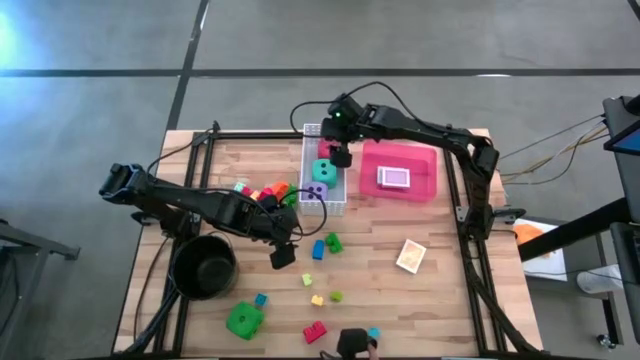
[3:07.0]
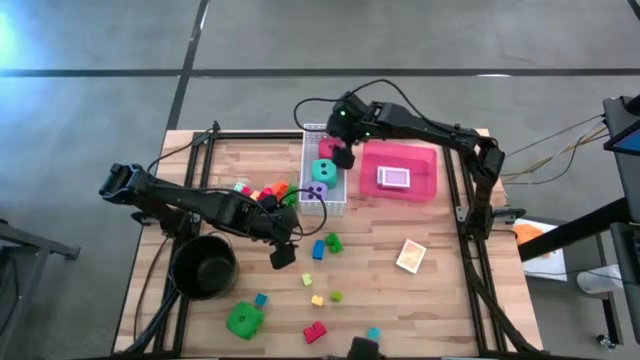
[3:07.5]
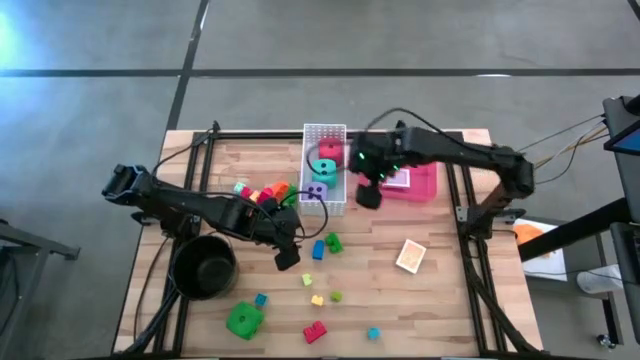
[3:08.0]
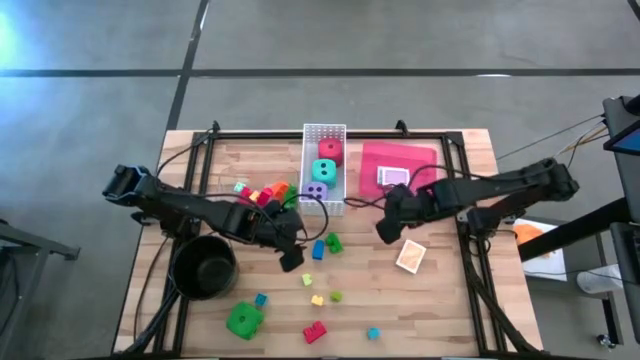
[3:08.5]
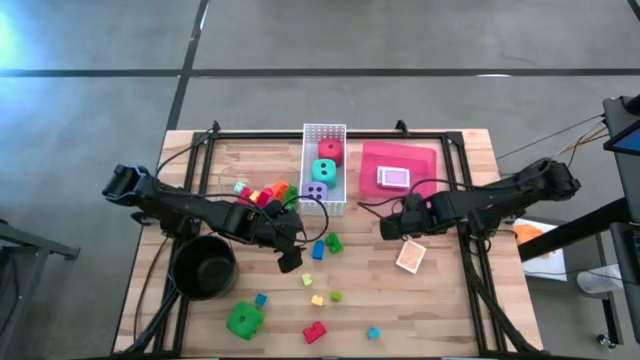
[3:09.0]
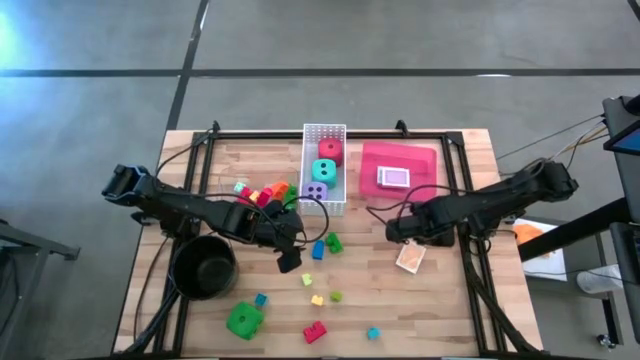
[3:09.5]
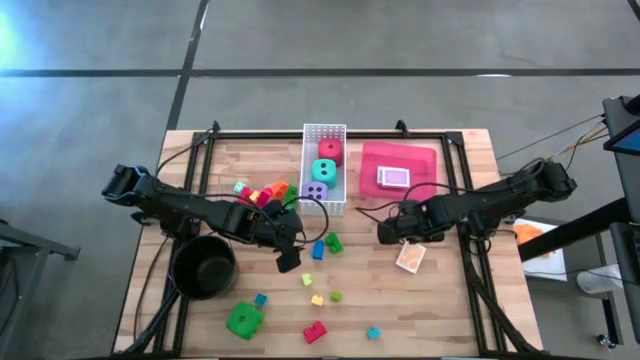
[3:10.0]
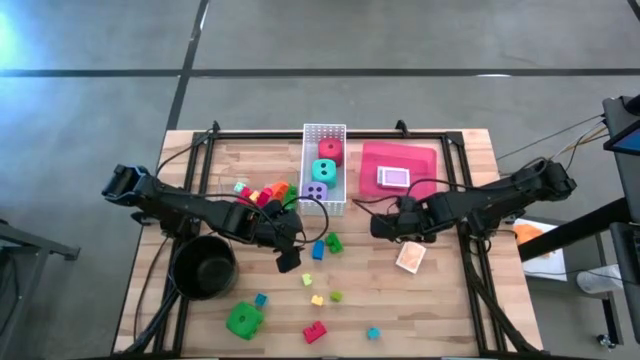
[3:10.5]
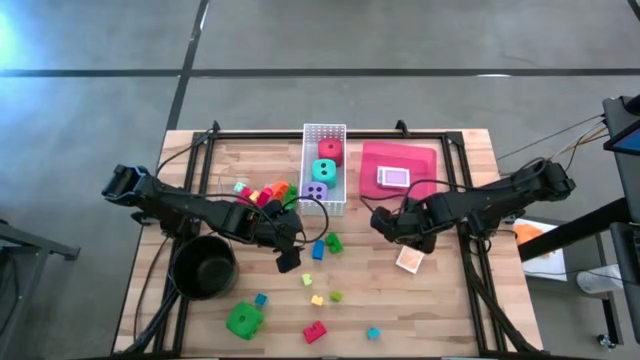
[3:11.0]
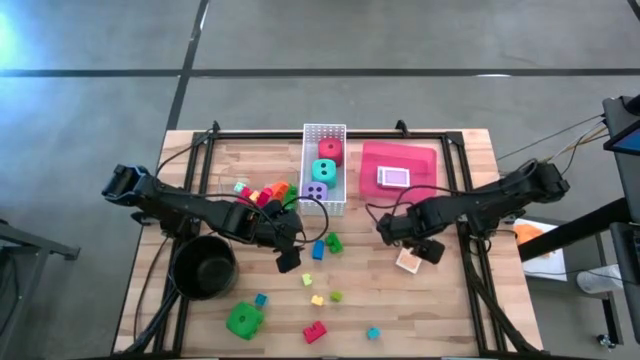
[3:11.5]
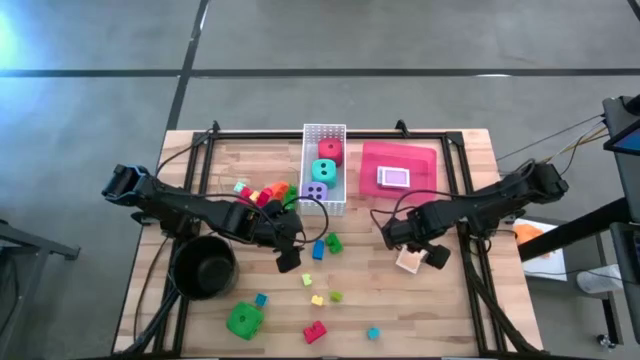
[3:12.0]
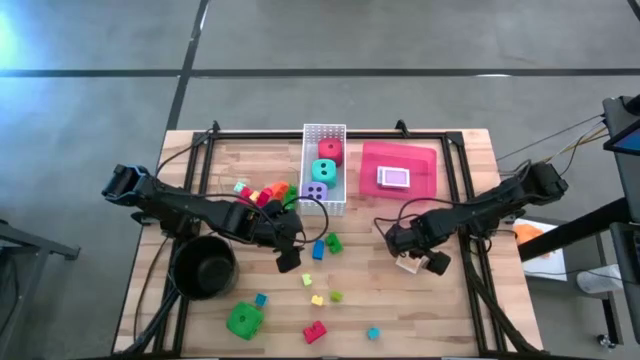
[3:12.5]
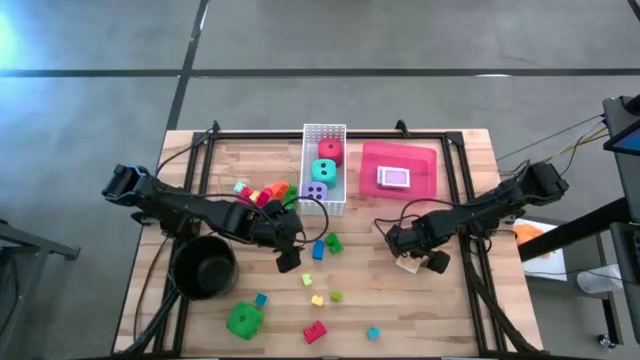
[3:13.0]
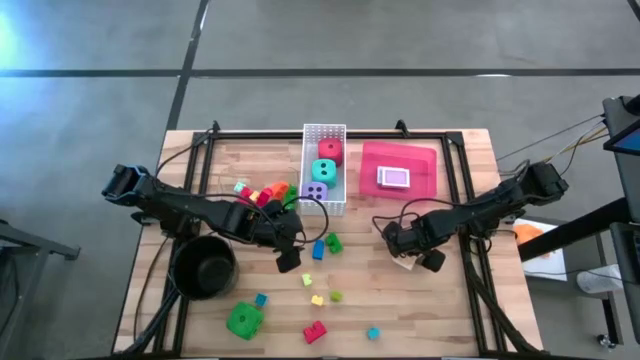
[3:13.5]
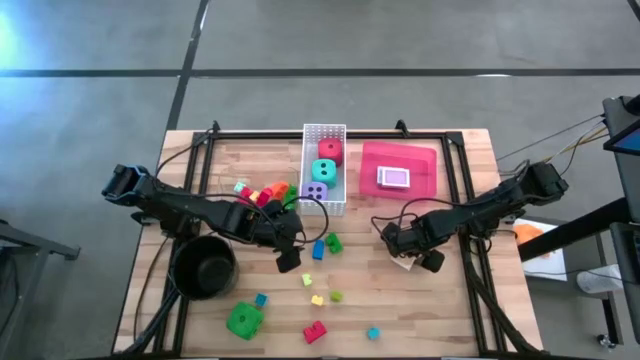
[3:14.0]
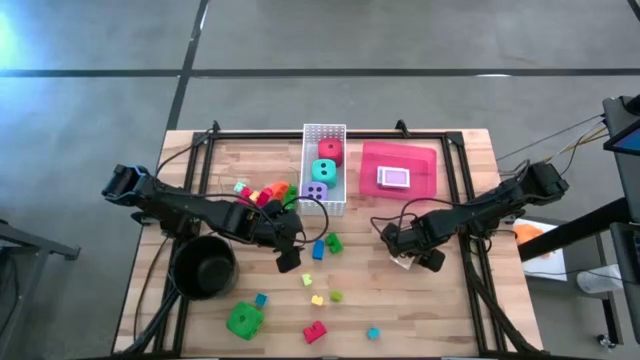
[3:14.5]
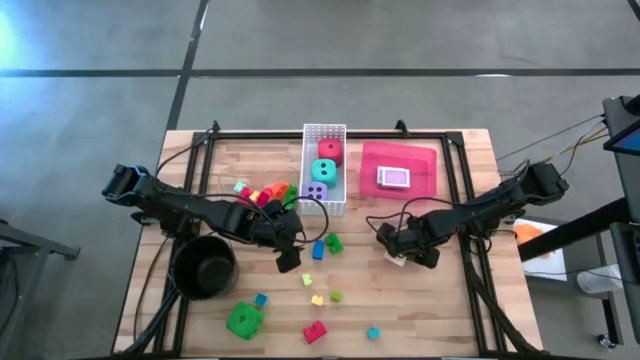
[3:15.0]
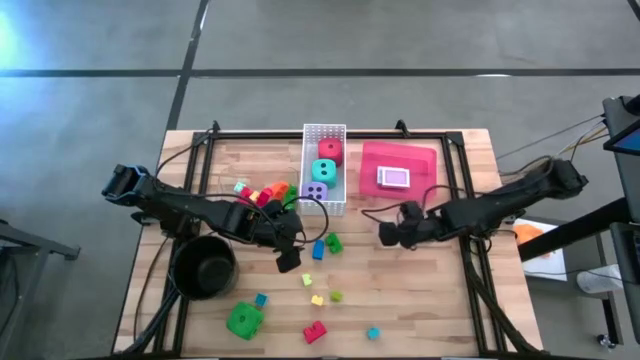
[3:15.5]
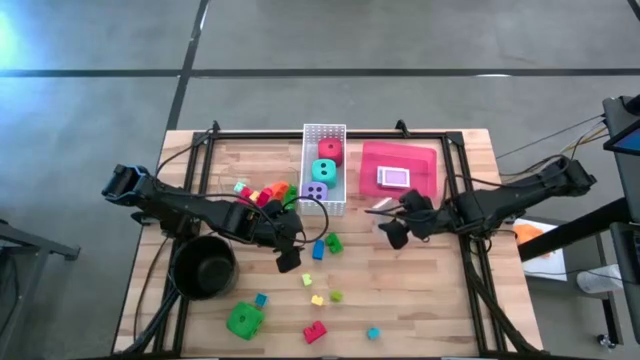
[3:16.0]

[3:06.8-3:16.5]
Task: Pick & Place Toys
Put the yellow deck of cards into the red bin

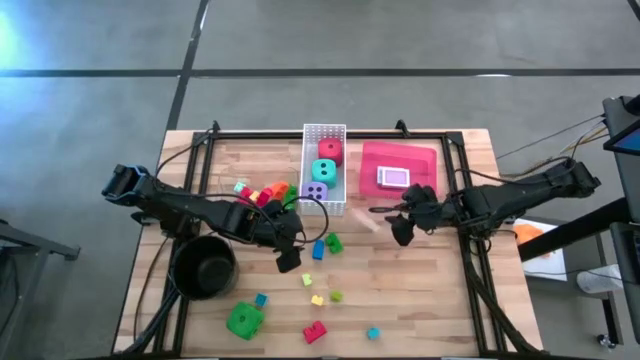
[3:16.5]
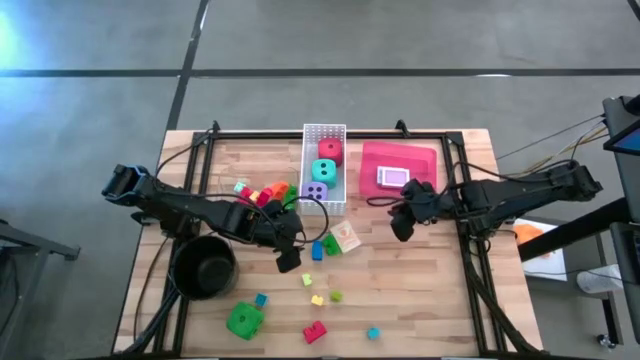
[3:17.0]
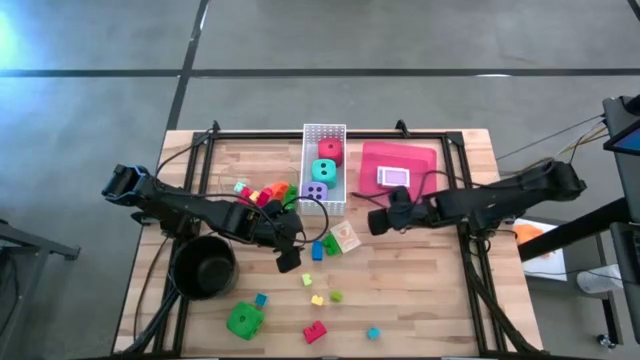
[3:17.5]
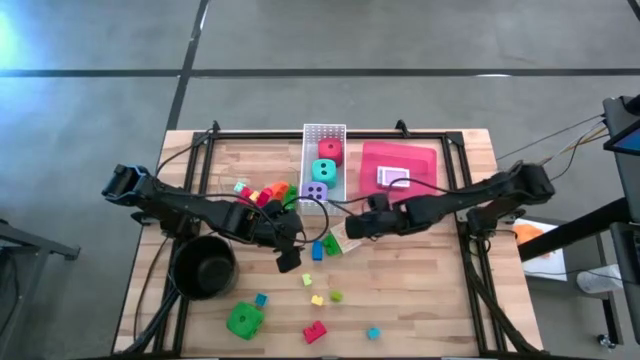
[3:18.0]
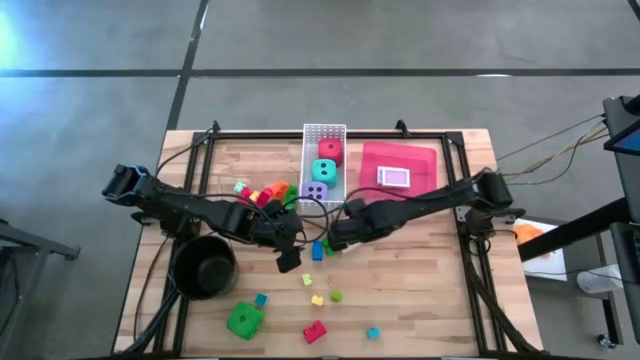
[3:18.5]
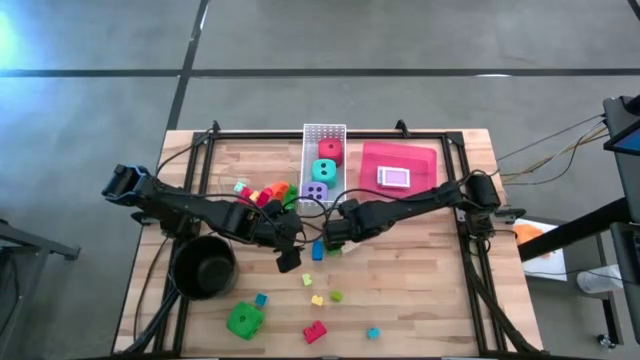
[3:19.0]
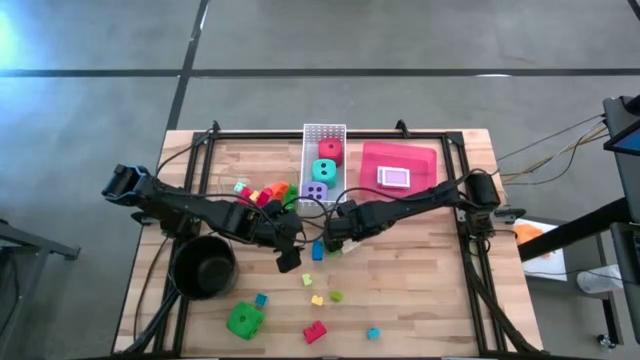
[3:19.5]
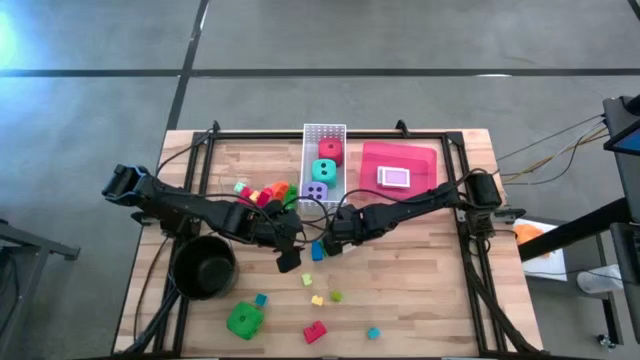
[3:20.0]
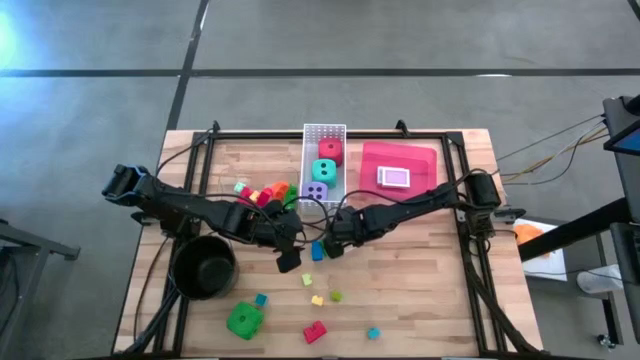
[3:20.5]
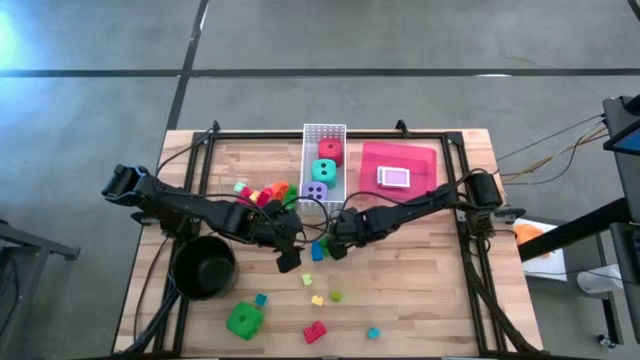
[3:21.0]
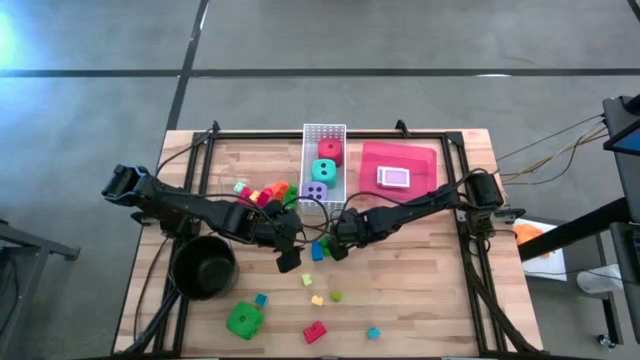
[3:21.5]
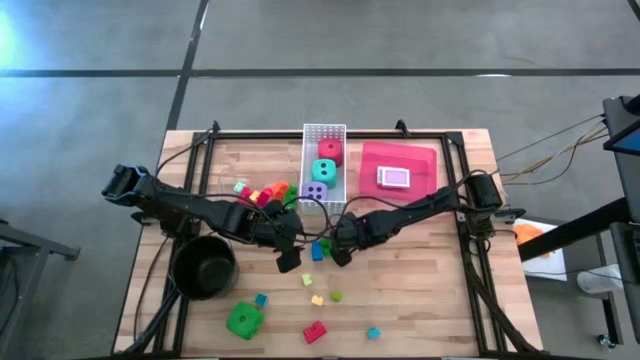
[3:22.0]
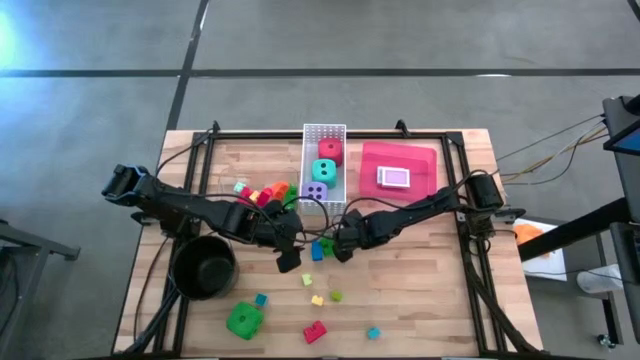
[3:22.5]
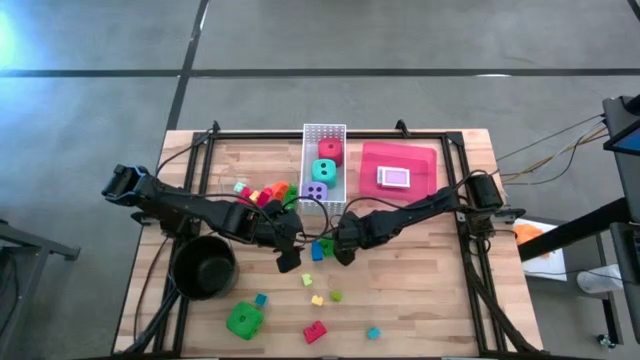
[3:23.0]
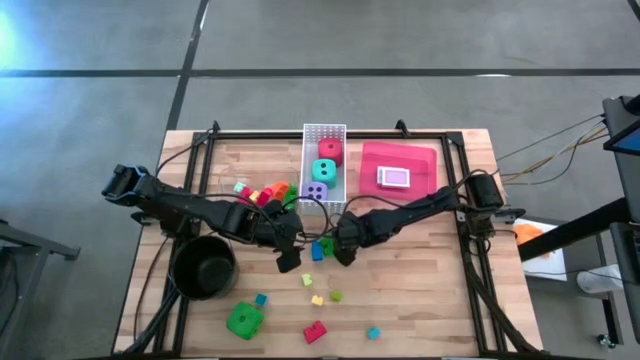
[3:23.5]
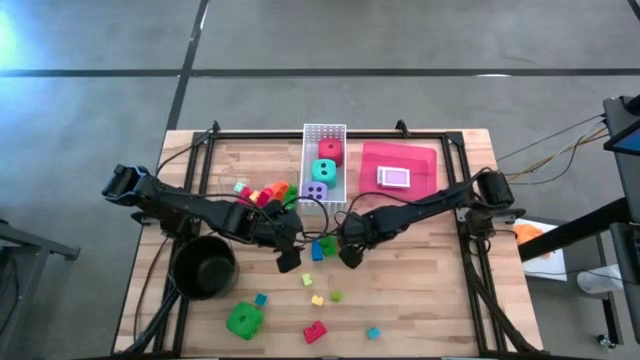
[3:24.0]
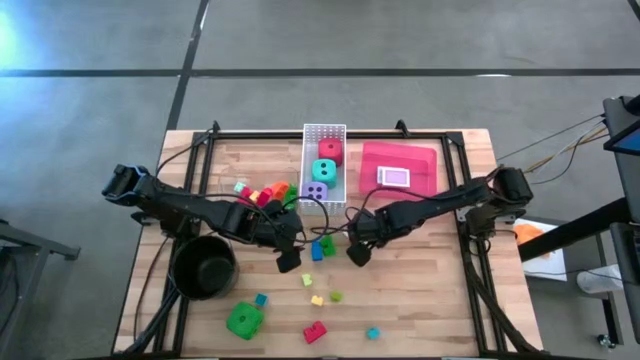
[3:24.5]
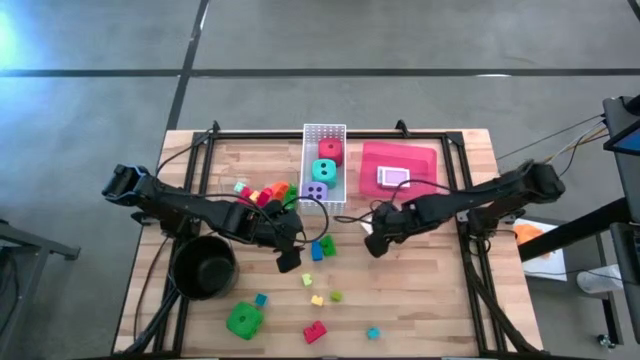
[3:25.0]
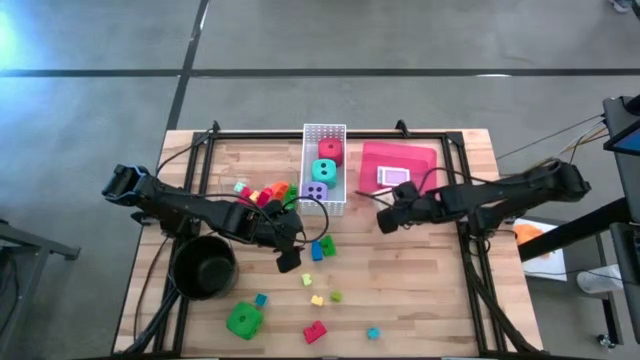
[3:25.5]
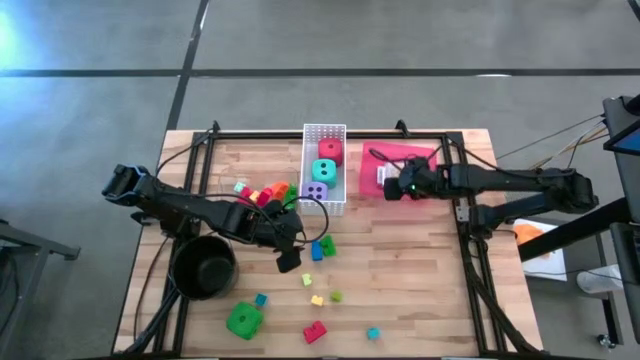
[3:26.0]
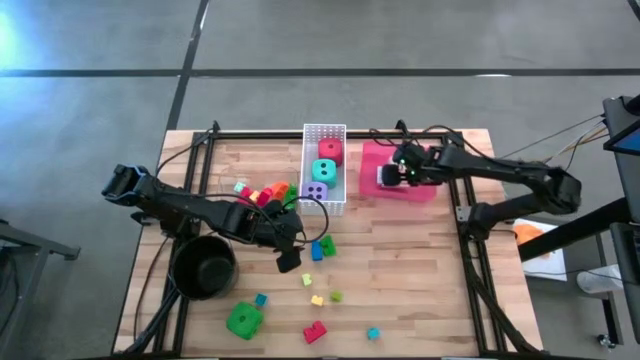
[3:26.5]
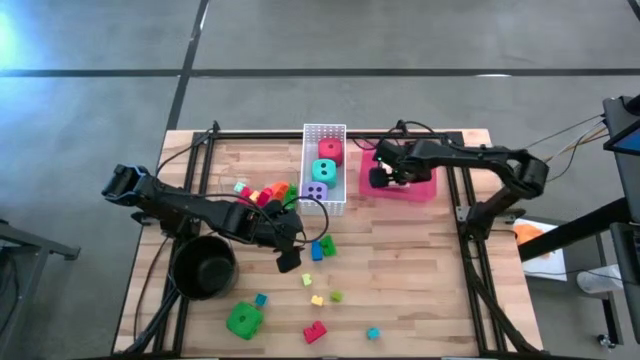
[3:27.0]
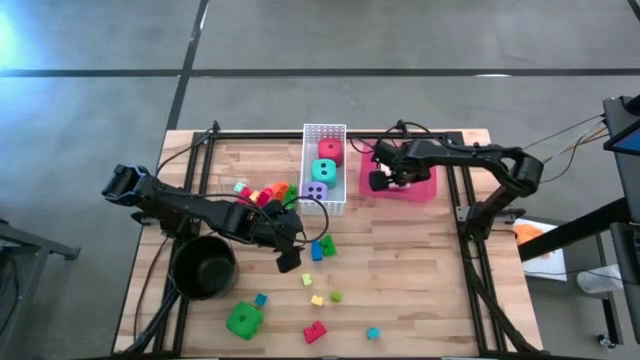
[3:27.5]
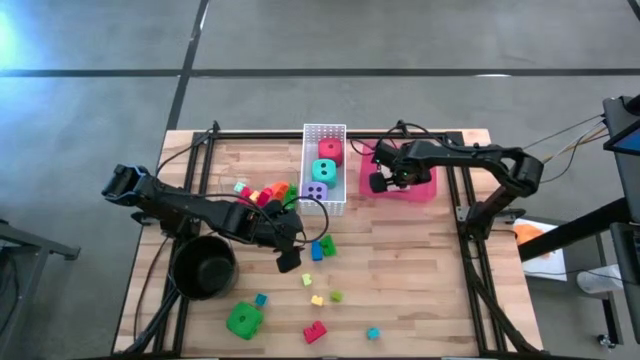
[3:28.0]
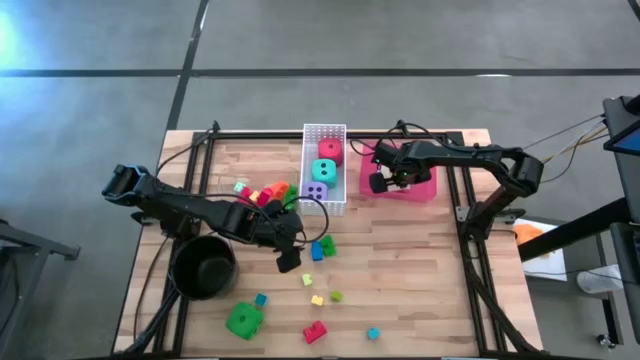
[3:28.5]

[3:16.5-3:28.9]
Put the yellow deck of cards into the red bin
